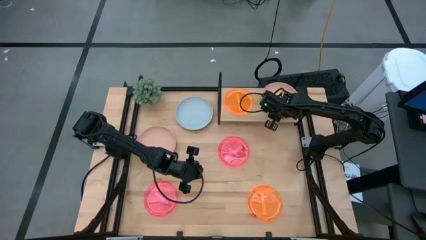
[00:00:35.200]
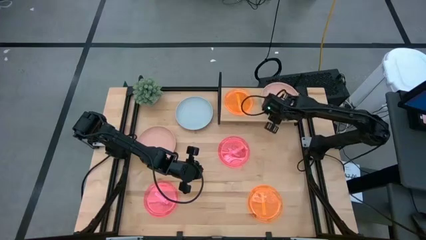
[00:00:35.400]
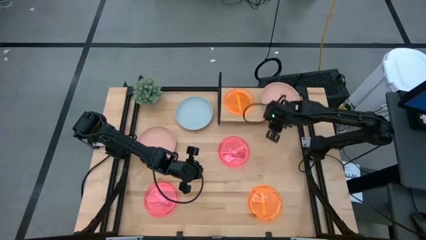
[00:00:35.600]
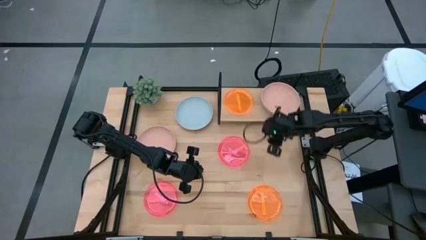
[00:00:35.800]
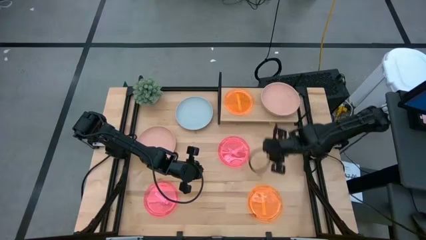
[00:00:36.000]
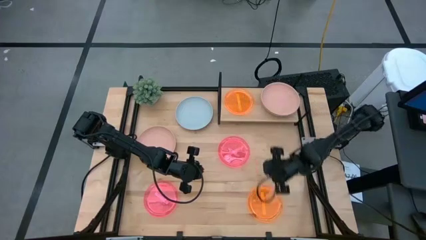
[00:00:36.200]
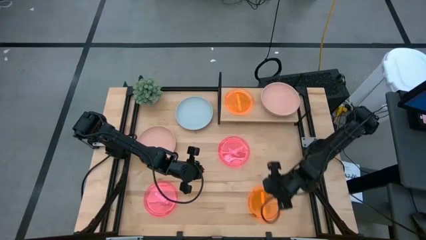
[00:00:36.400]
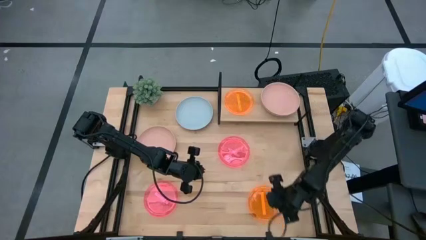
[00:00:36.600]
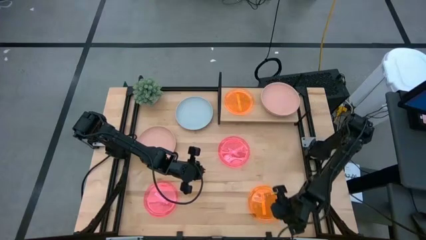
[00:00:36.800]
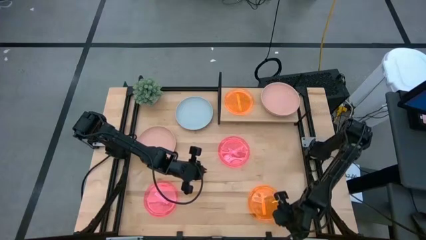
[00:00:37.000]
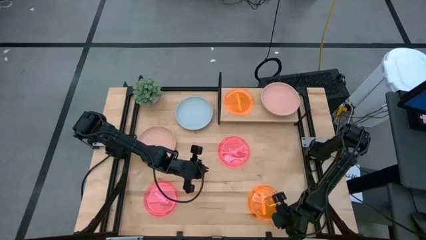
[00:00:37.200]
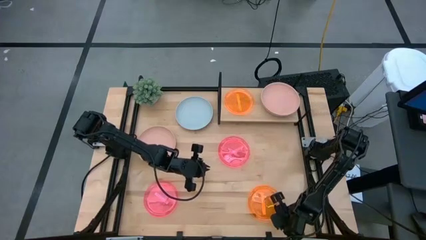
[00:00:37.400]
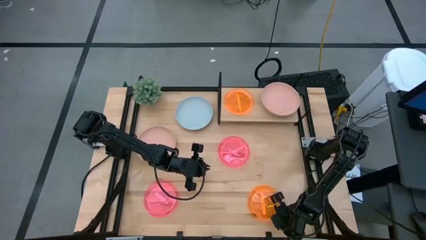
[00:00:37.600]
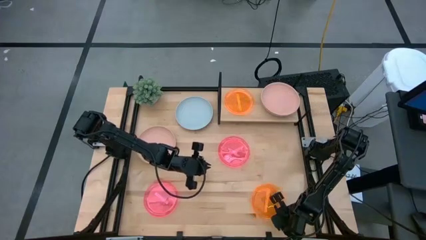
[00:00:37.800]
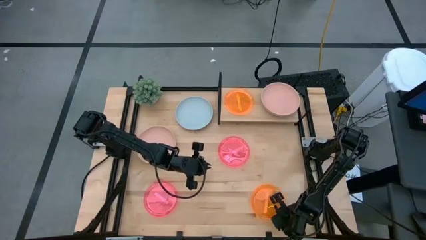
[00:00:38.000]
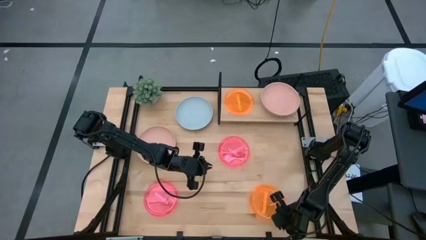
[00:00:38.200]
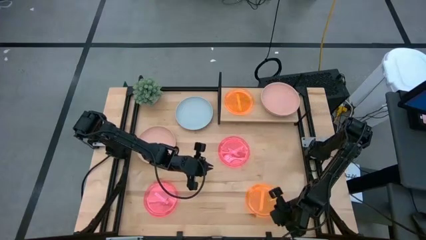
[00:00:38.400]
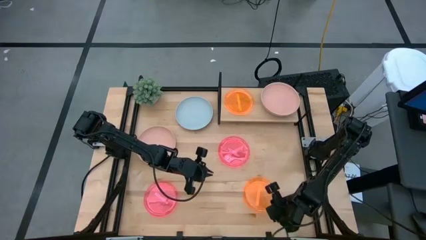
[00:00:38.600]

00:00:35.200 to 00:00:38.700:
Task: Place and stack plates onto a shelf
Stack the orange plate on top of the orange plate on the shelf

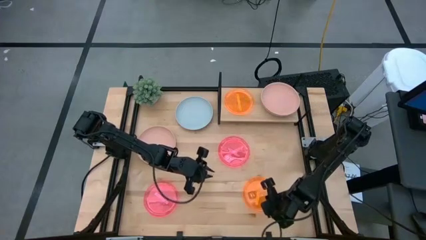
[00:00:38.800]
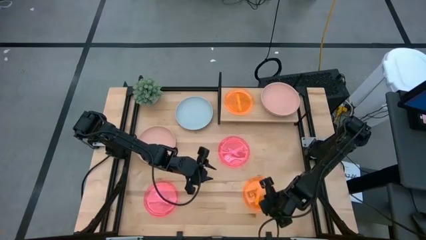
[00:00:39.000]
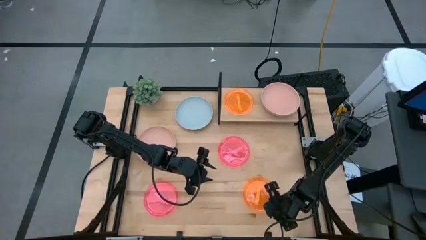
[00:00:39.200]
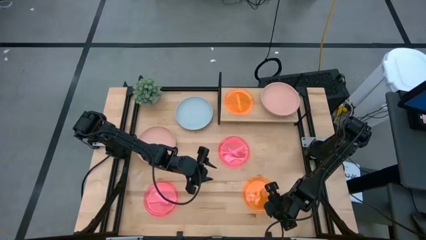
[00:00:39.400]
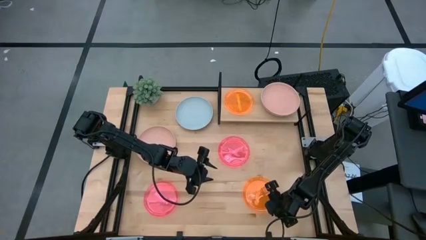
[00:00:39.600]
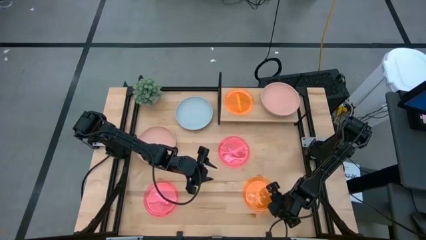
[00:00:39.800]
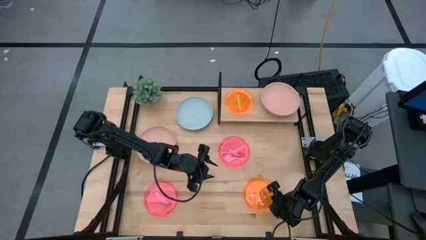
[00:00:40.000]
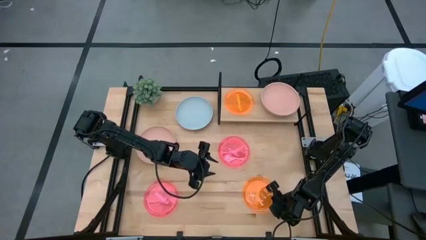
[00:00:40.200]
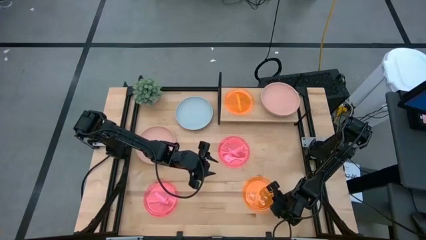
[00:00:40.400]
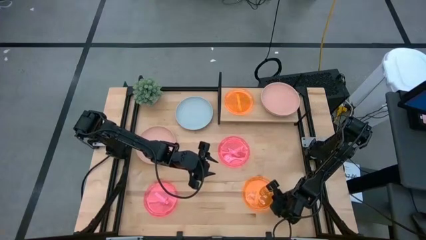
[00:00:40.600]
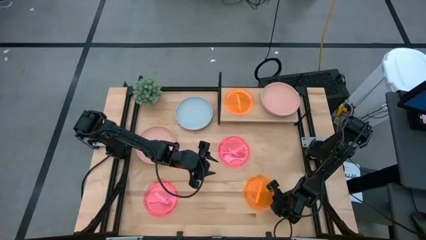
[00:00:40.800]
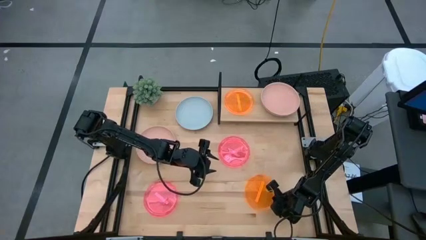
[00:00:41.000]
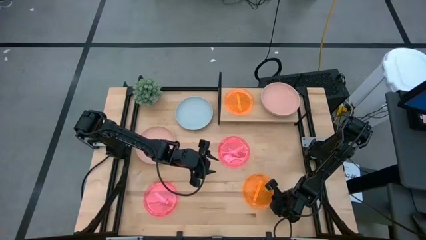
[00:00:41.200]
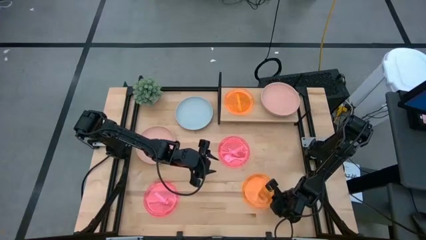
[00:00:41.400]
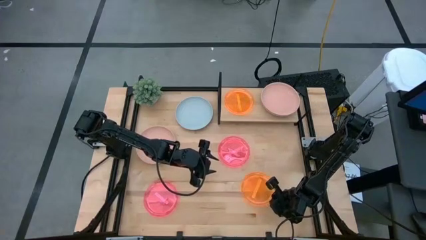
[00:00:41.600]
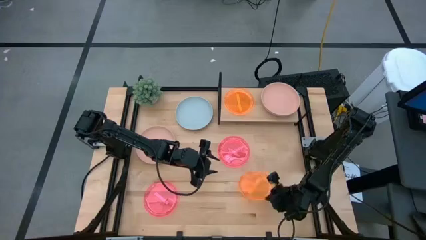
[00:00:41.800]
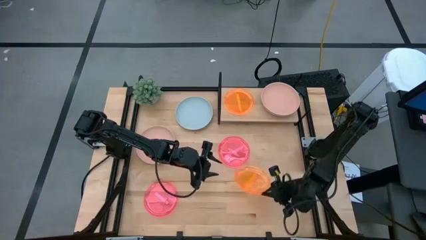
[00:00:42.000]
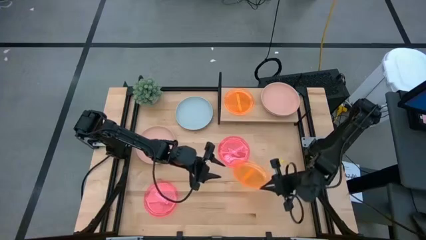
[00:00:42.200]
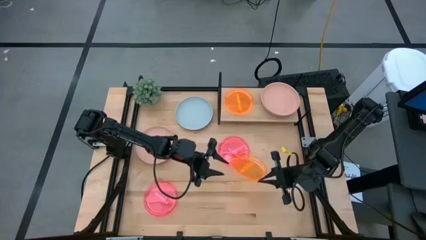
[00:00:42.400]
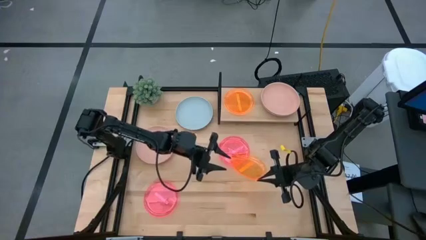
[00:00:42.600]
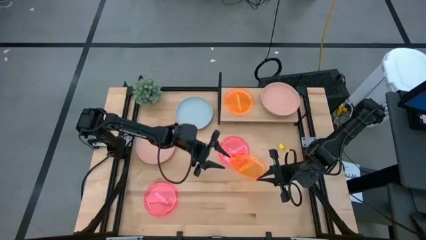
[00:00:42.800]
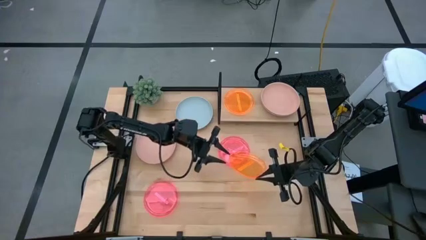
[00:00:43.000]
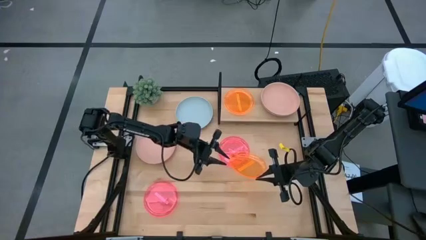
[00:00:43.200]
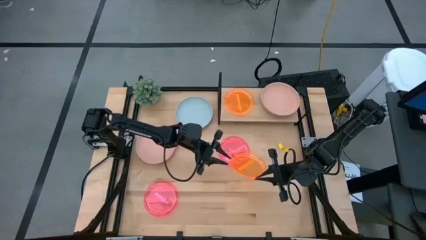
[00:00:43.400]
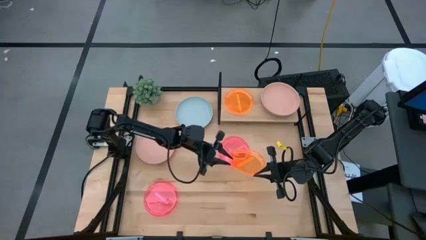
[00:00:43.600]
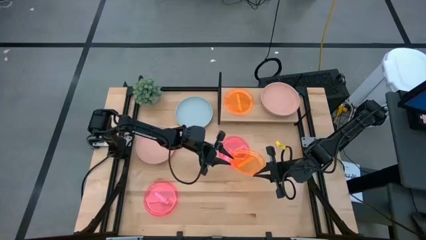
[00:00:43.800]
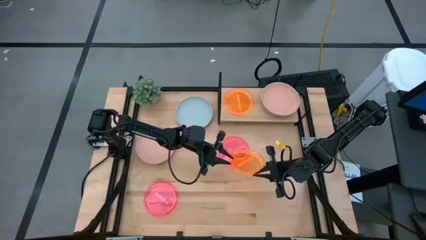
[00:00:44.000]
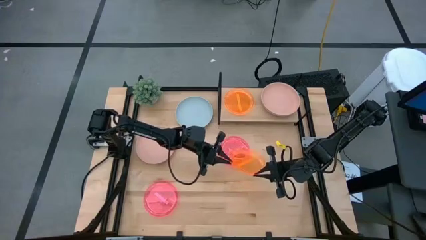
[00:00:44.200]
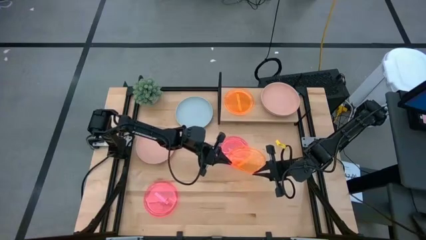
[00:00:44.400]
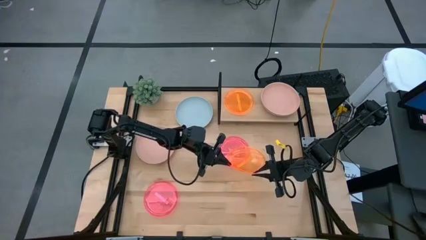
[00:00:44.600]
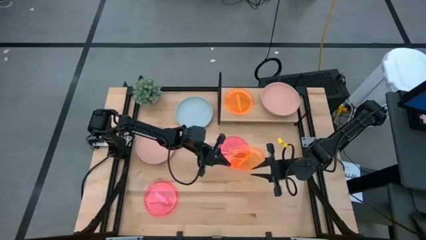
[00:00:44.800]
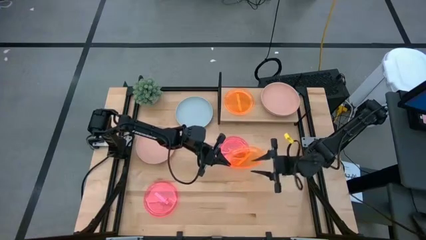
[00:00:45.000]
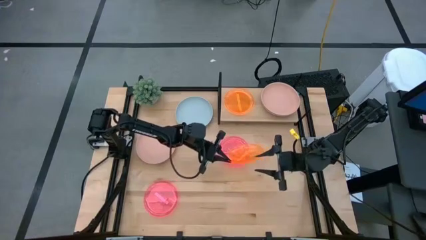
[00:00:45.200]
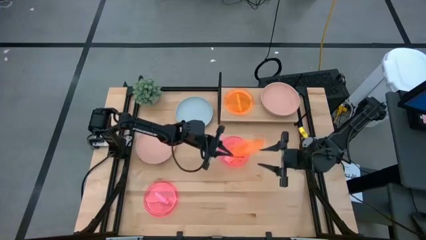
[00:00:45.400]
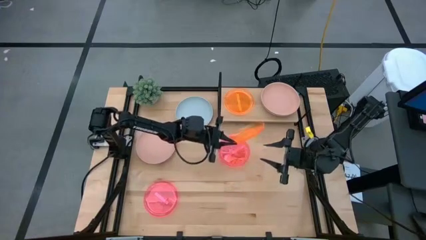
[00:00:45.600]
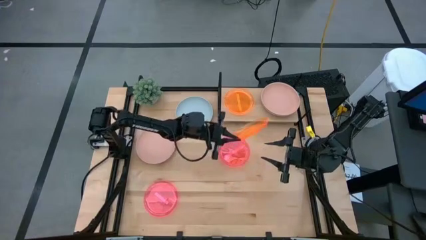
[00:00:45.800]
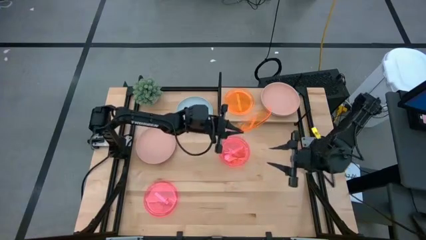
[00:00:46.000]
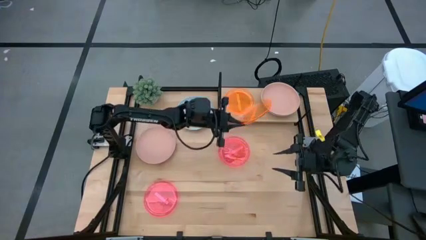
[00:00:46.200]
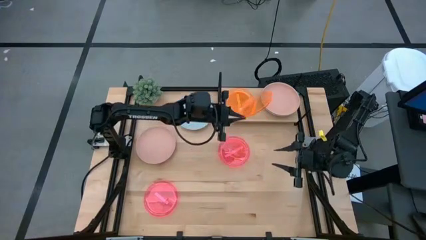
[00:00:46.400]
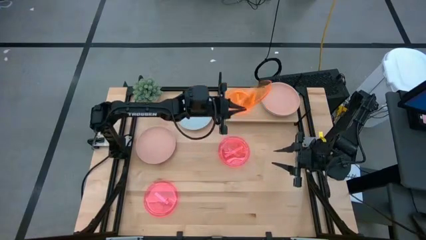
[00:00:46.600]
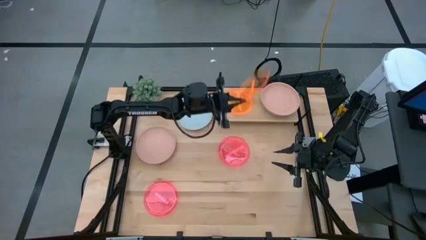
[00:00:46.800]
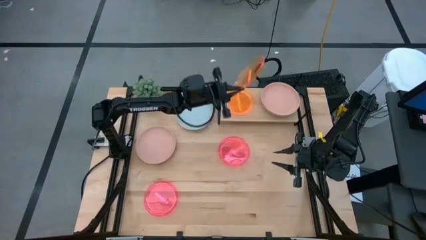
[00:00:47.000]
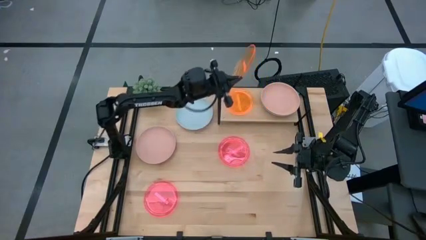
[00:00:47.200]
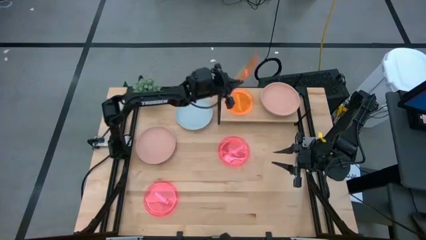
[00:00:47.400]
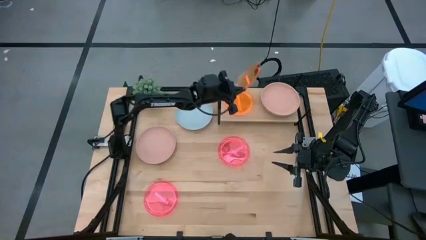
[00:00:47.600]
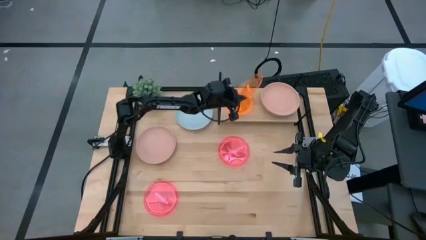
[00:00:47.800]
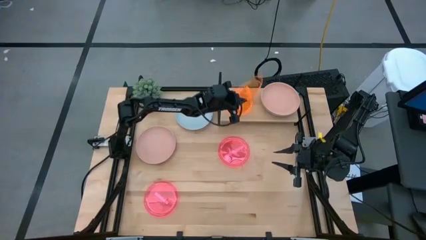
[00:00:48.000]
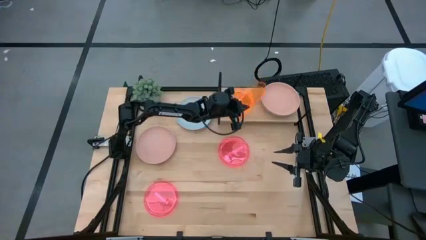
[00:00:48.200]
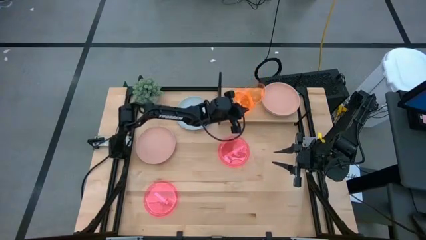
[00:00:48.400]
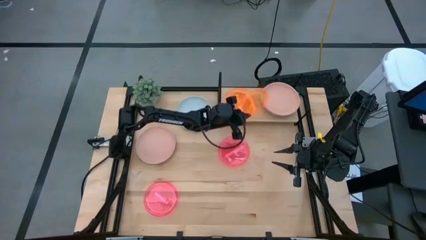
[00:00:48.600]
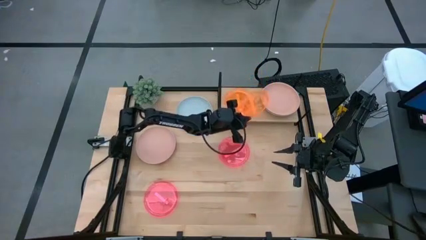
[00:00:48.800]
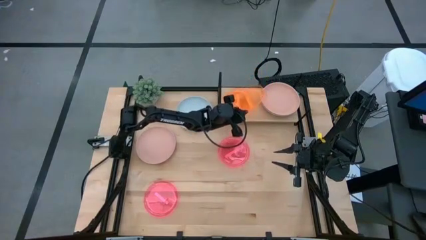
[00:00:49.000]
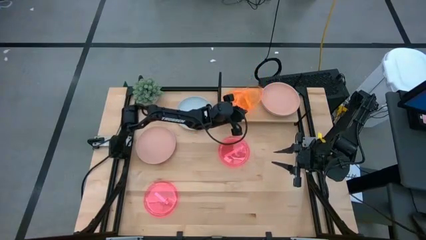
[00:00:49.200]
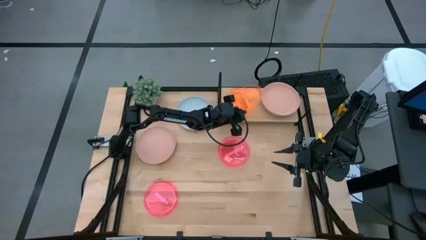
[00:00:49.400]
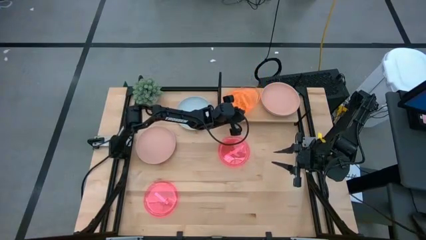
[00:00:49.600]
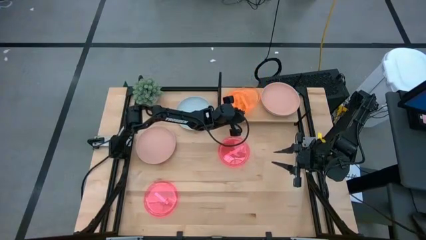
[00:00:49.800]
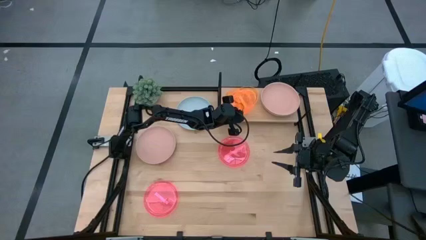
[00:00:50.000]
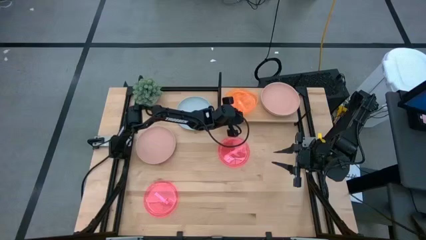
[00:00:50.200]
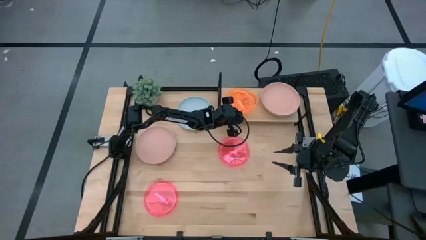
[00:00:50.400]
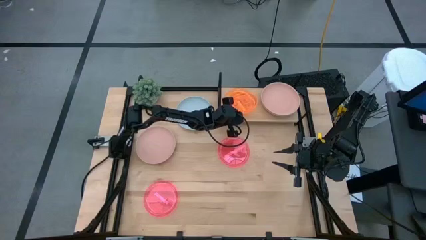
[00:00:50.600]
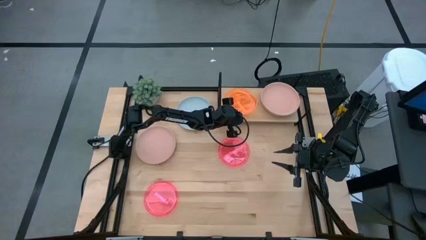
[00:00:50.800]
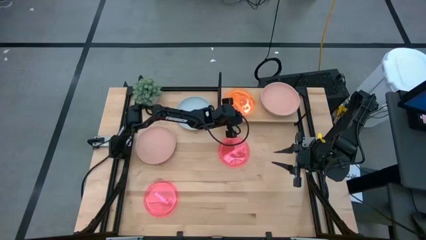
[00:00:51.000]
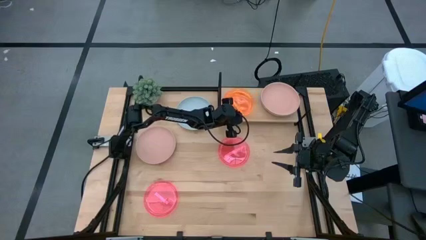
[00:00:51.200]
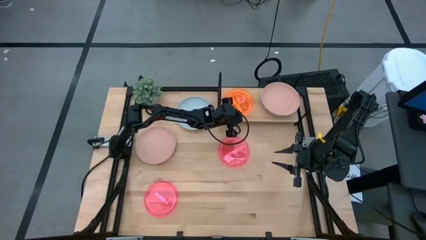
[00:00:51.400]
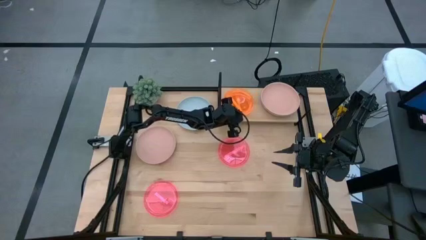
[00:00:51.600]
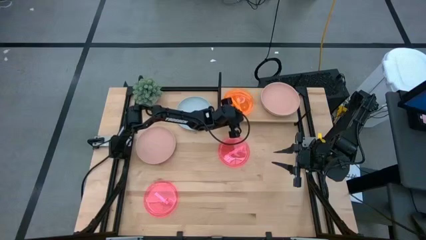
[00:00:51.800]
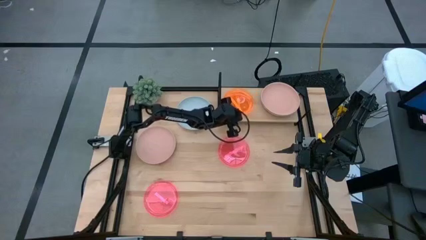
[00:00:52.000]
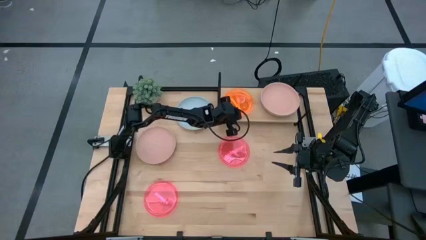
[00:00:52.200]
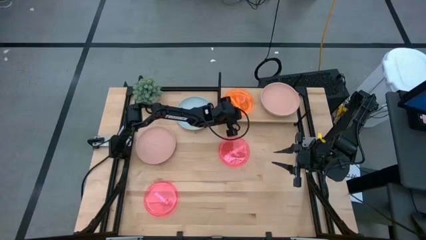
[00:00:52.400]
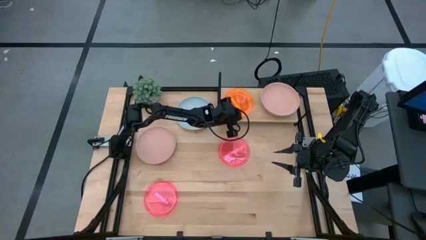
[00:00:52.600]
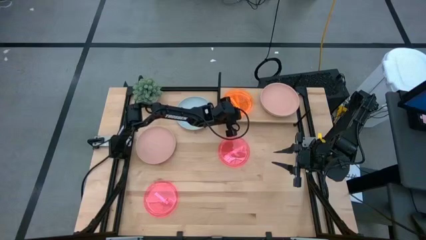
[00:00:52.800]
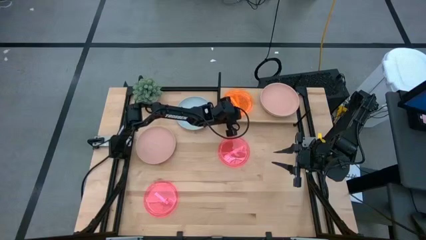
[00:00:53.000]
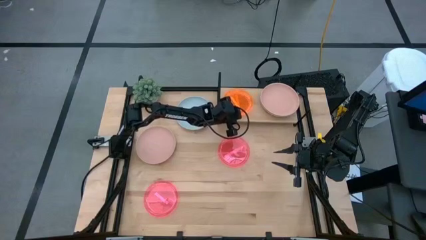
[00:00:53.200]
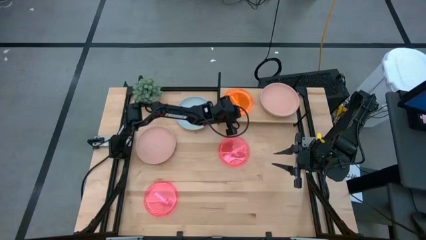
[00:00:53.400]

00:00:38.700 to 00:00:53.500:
Stack the orange plate on top of the orange plate on the shelf
